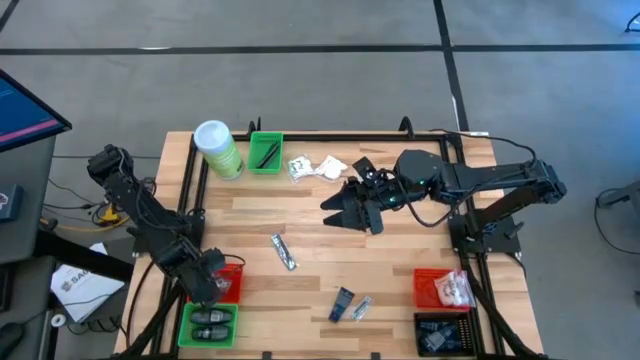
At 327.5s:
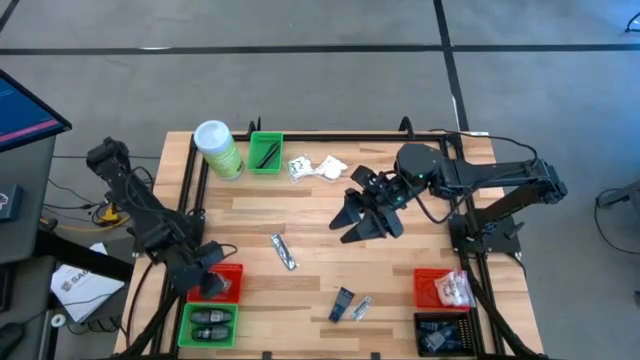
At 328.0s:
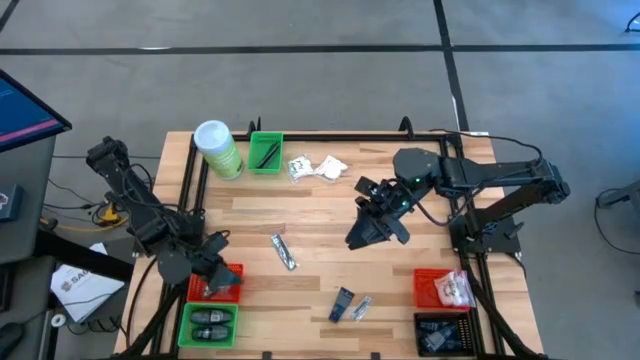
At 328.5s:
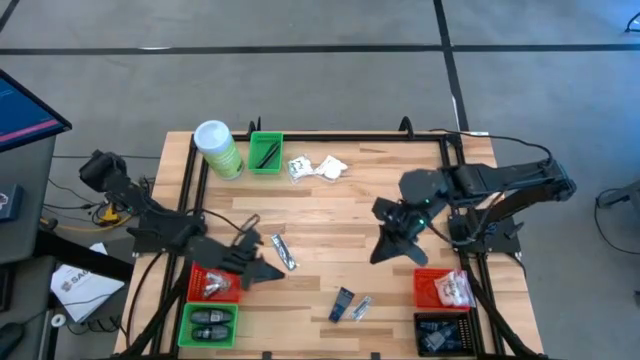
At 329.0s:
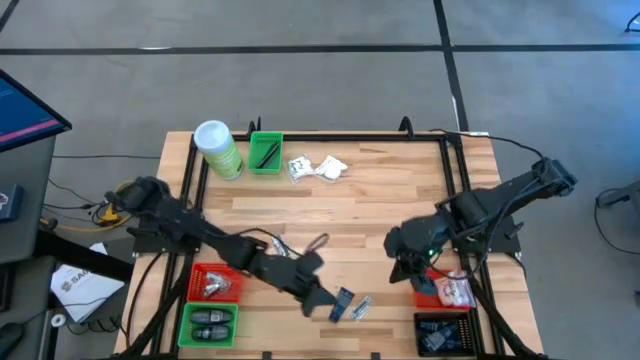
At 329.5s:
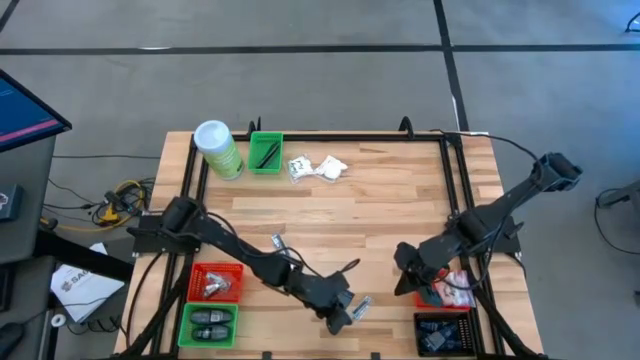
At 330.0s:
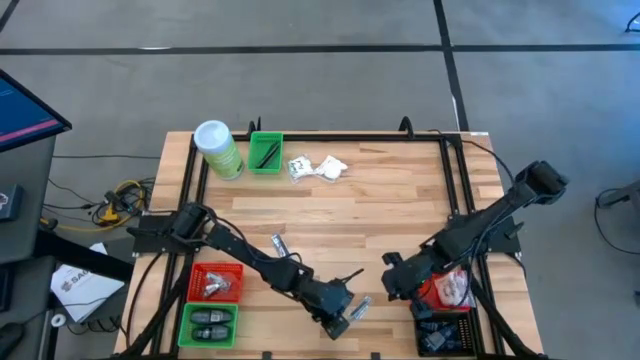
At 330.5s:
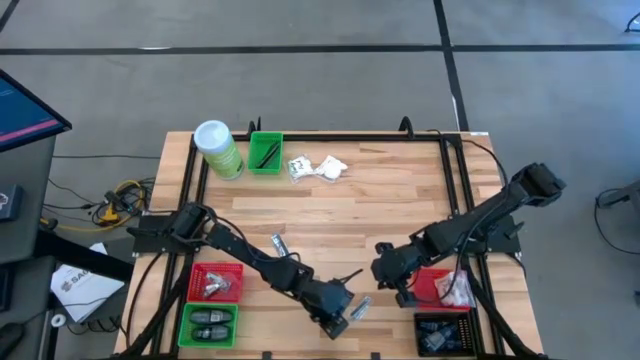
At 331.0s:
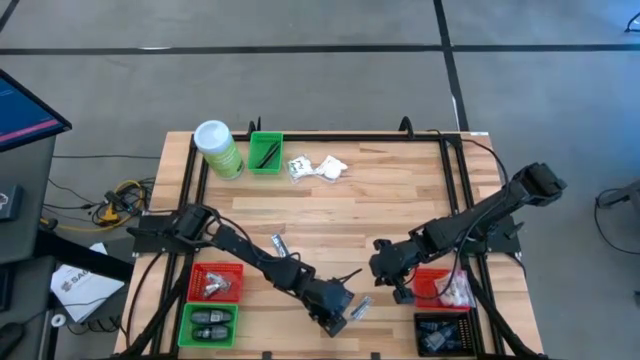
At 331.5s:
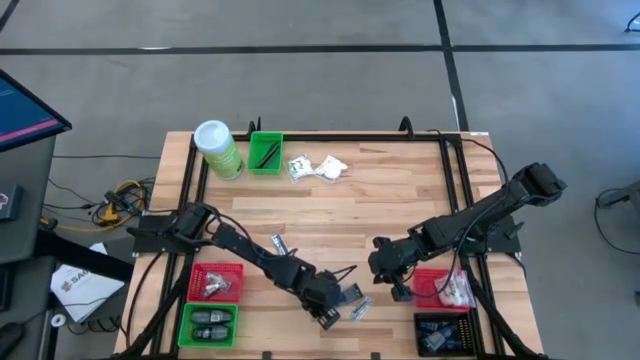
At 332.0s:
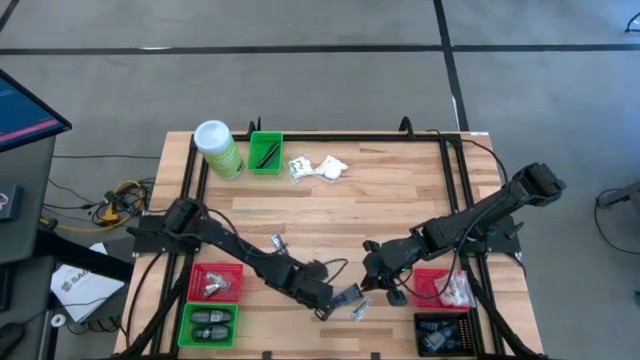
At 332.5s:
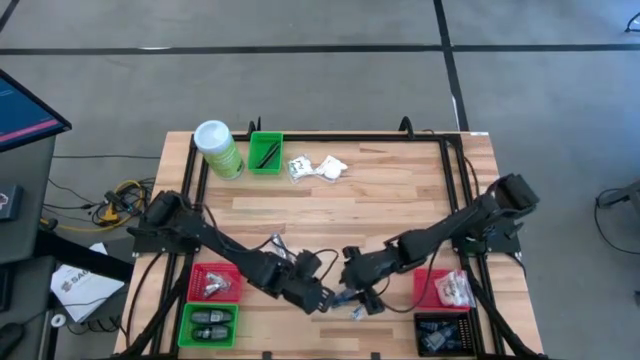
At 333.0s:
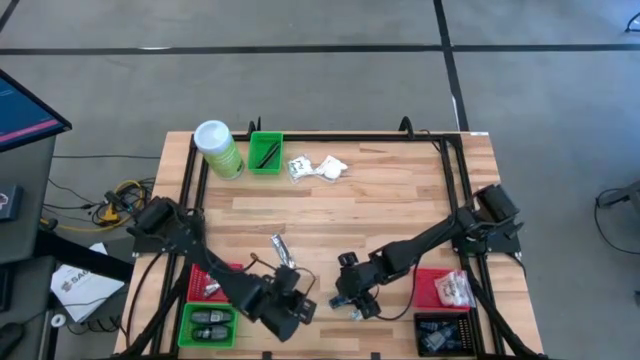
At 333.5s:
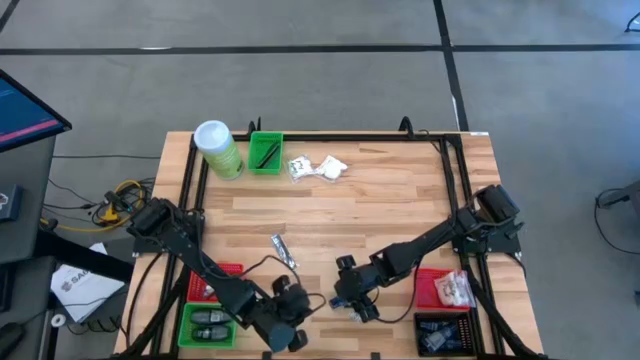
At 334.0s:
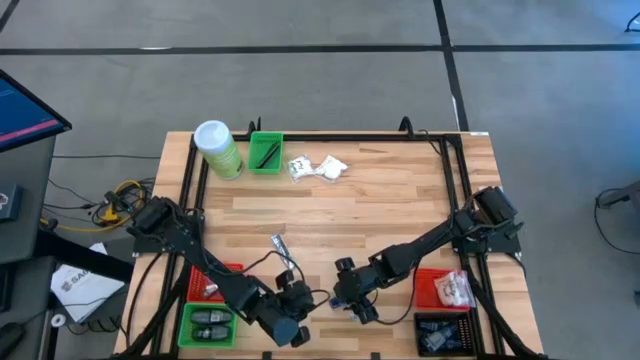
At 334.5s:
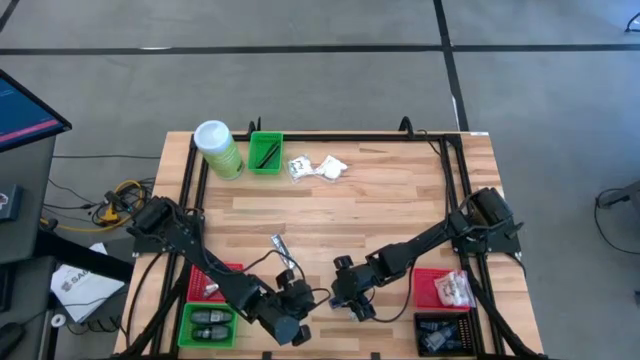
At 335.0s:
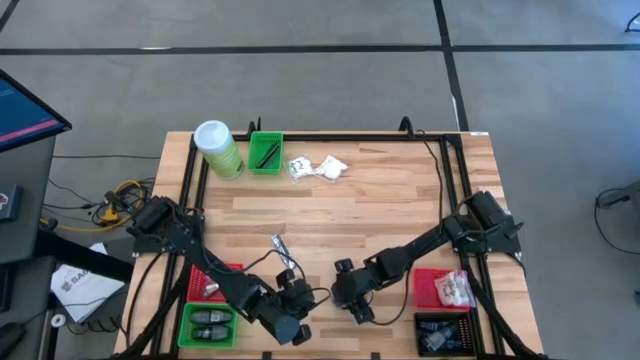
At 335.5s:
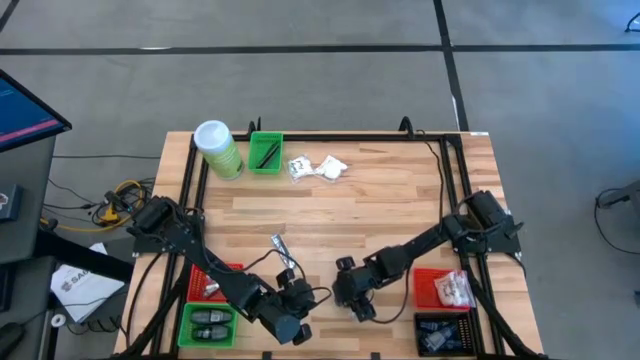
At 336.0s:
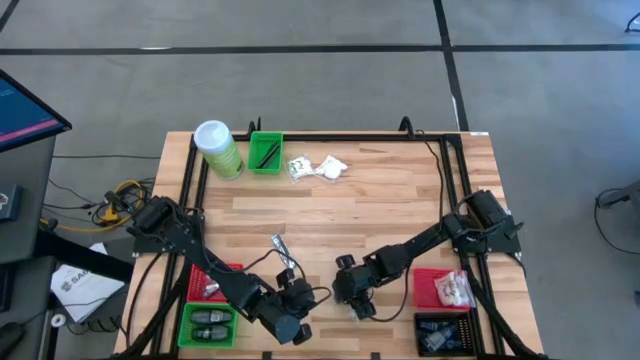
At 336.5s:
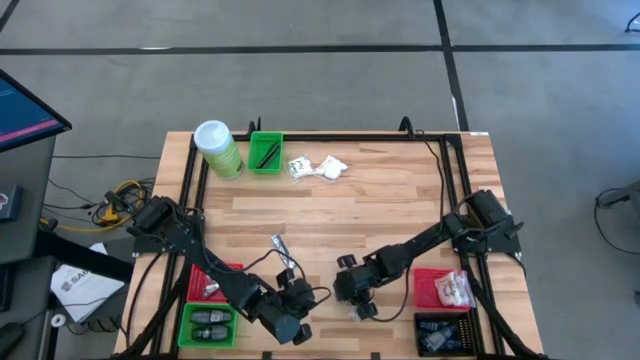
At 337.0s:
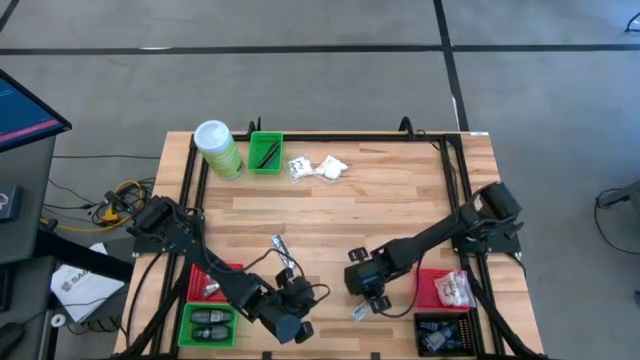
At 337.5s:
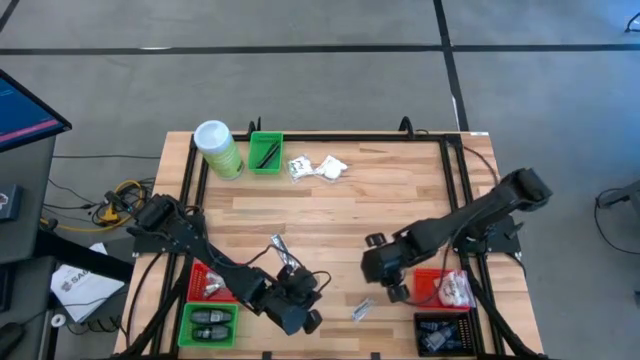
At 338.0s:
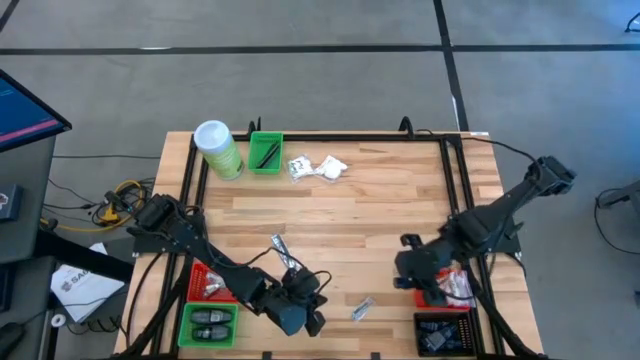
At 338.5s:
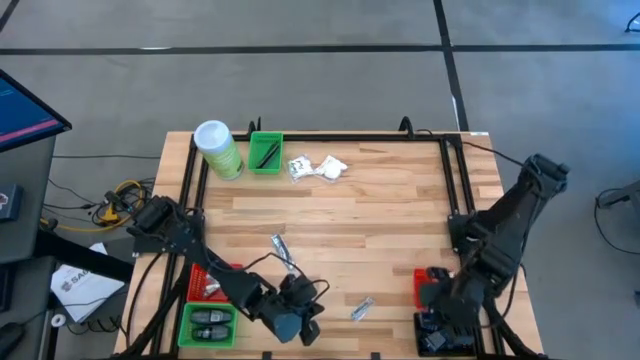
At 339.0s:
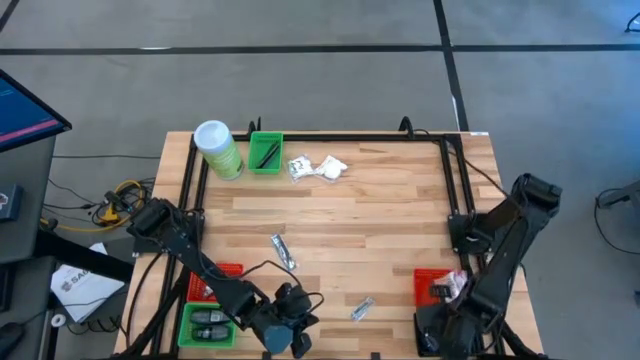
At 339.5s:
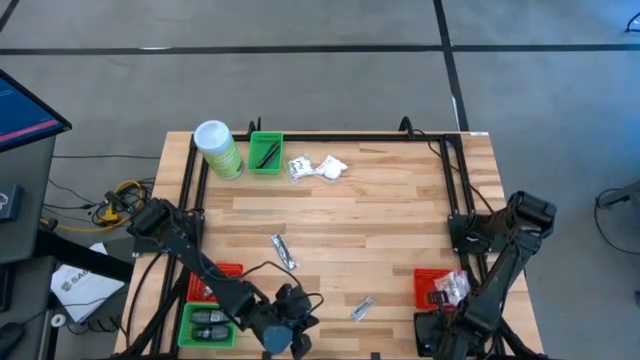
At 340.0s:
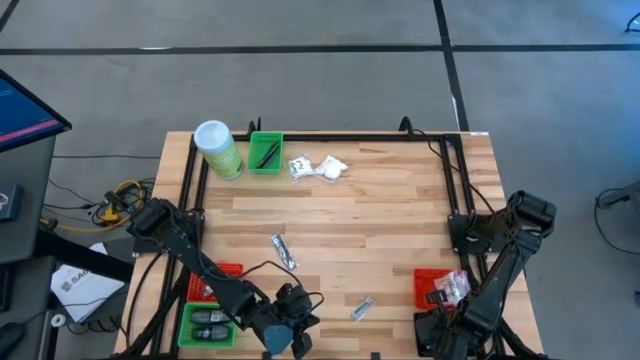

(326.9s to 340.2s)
Task: Pick & Place Travel size toiletries
Put the shave cream into the black bin

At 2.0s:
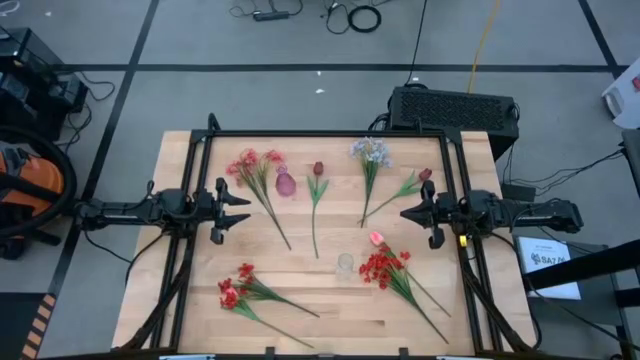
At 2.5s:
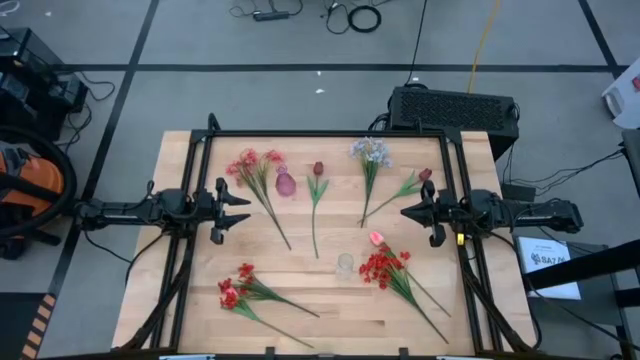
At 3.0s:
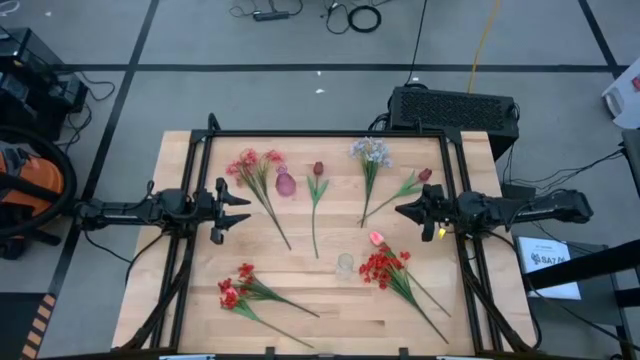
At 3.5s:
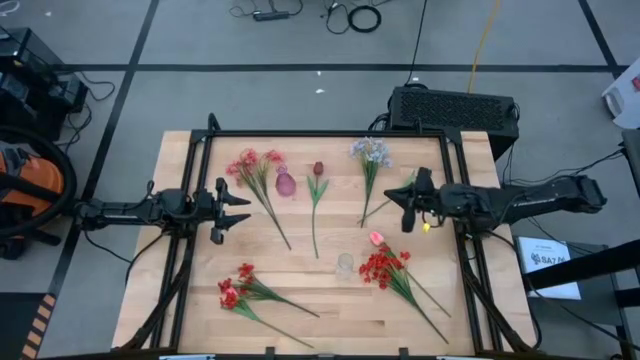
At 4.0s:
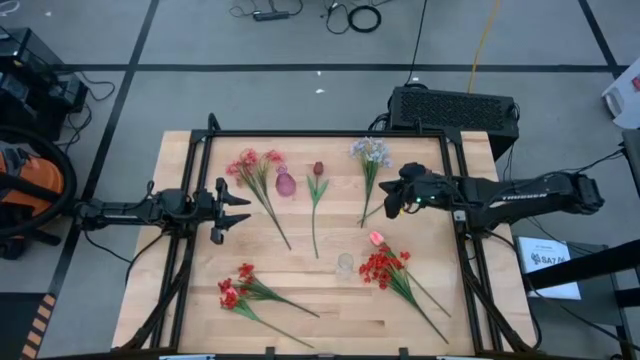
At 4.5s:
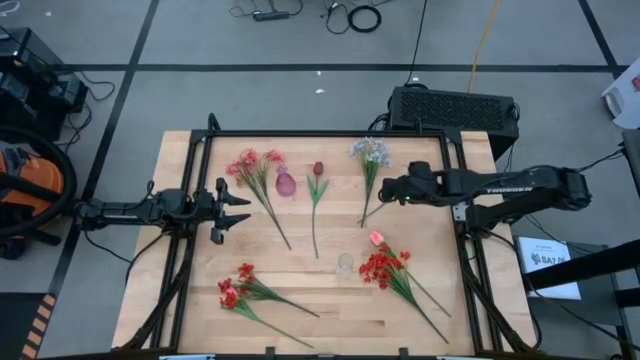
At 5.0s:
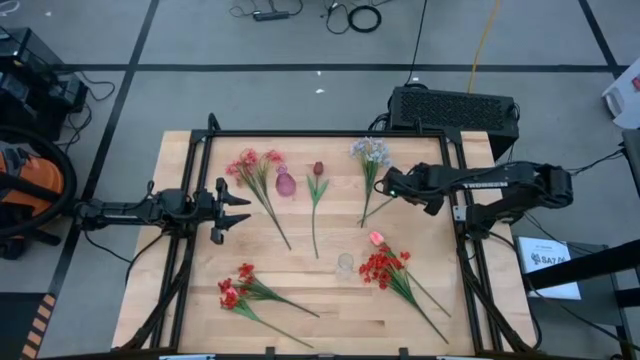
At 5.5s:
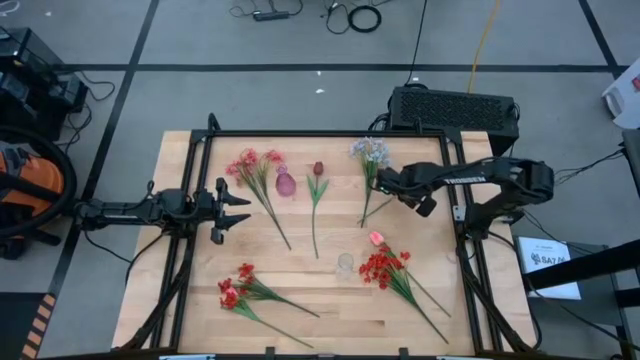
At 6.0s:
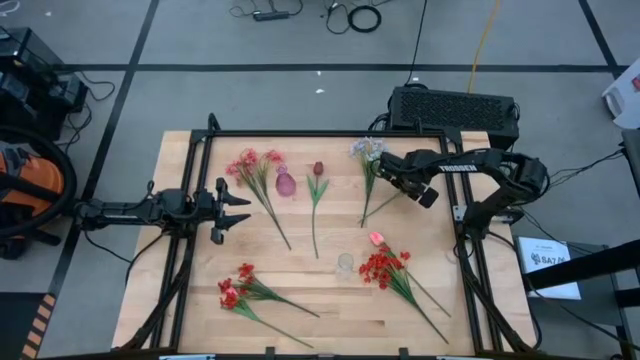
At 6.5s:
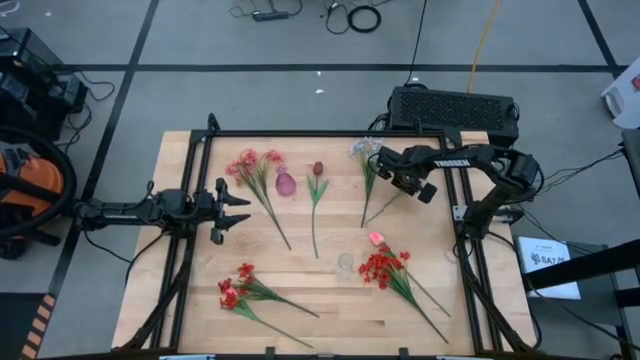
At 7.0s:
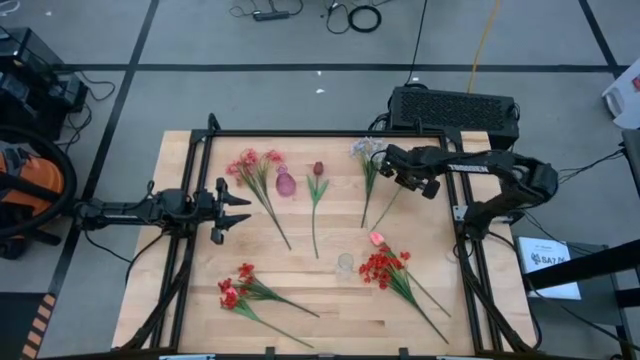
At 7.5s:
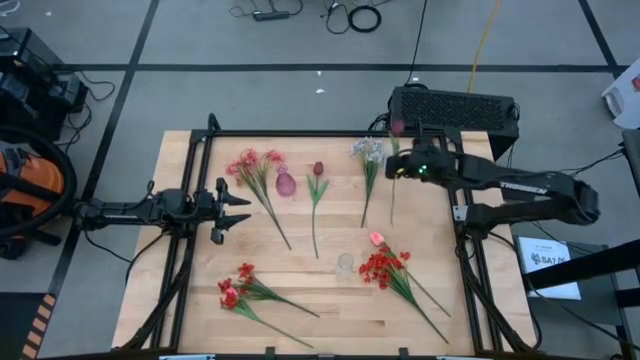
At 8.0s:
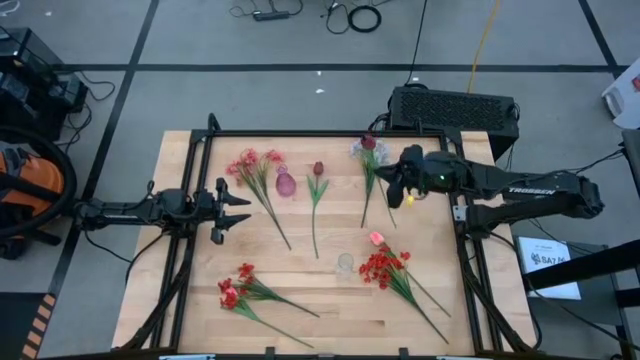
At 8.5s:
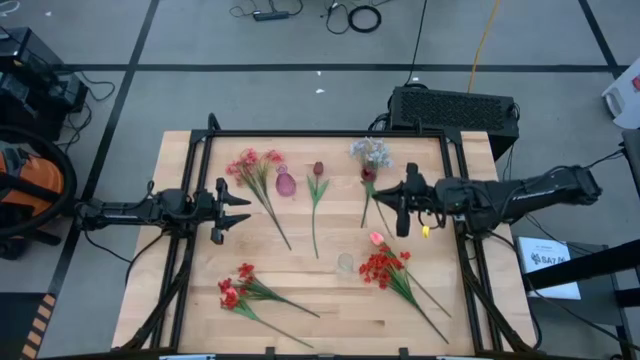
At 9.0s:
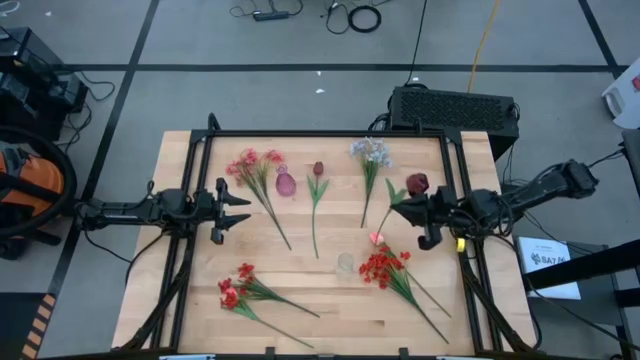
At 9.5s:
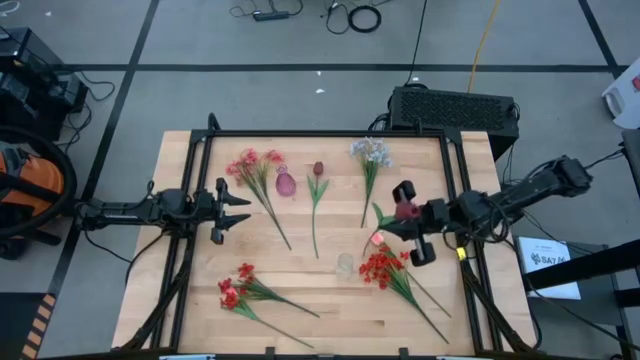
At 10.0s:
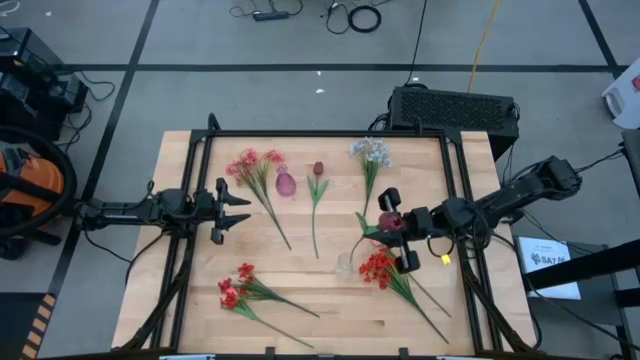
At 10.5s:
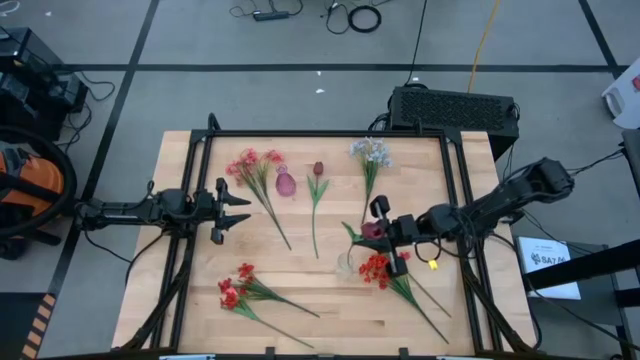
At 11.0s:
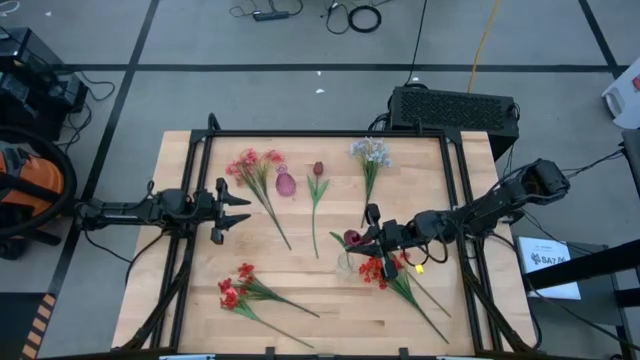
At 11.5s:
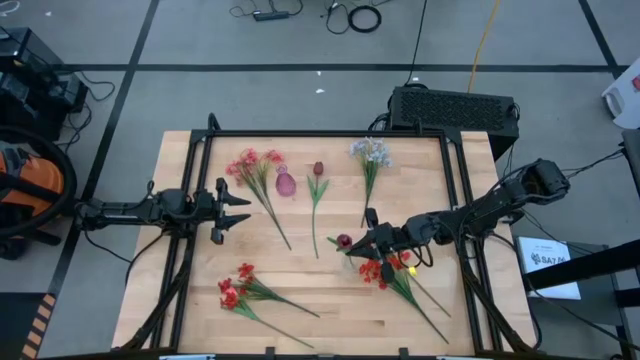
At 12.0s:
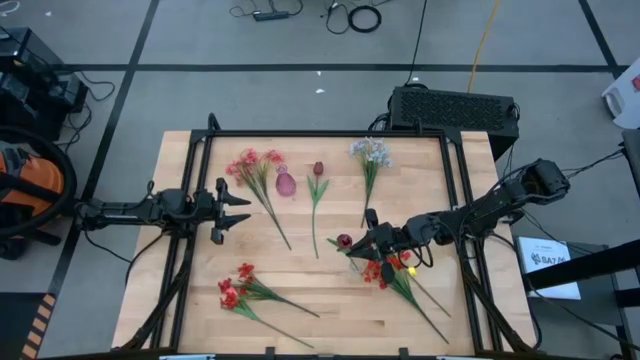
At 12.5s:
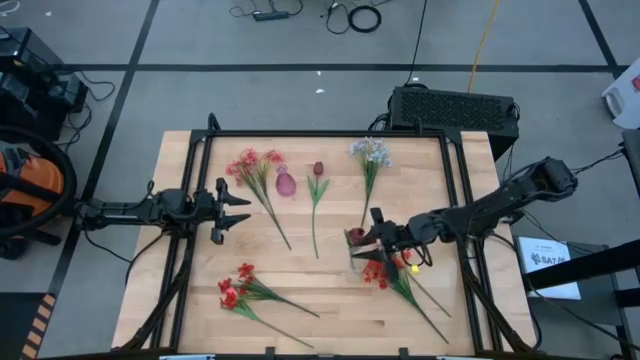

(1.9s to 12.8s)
Task: Sort flowers into vase by color
Put the right dark red tulip into the transparent flower vase
